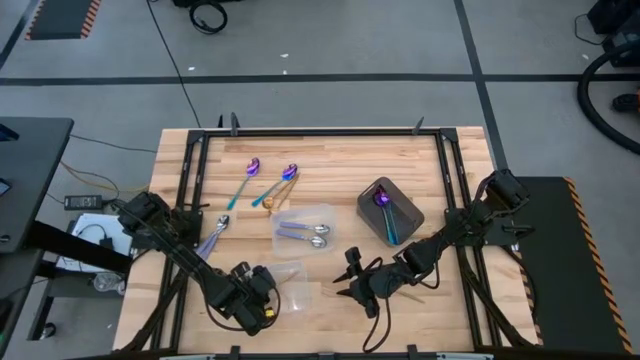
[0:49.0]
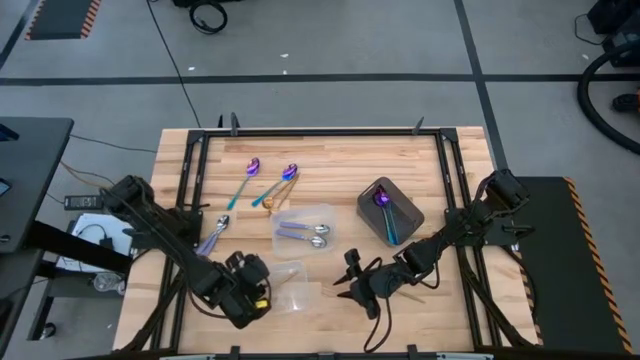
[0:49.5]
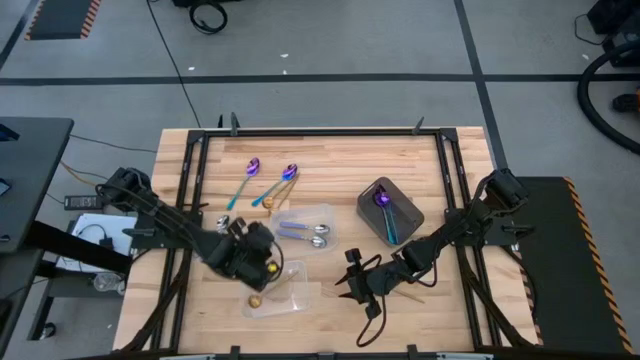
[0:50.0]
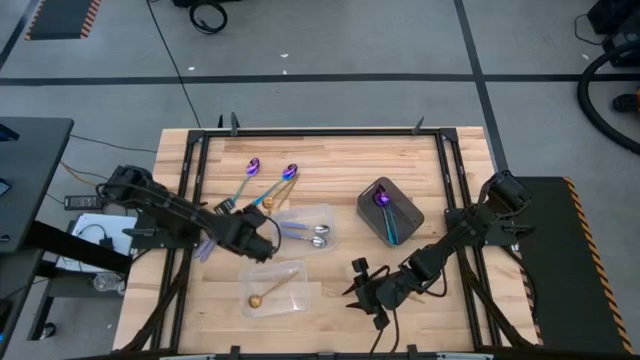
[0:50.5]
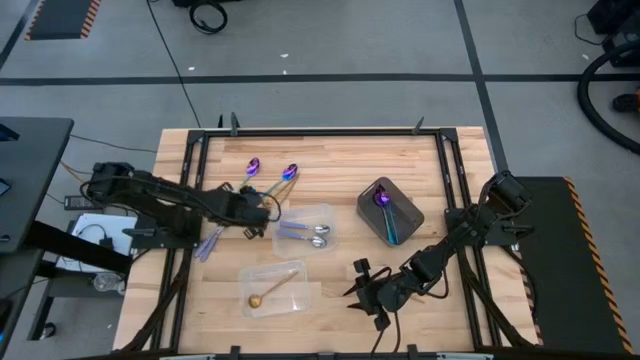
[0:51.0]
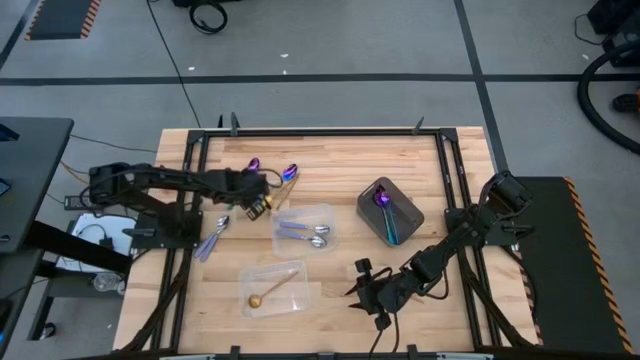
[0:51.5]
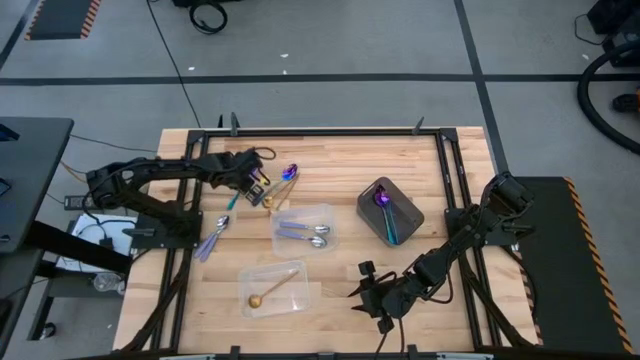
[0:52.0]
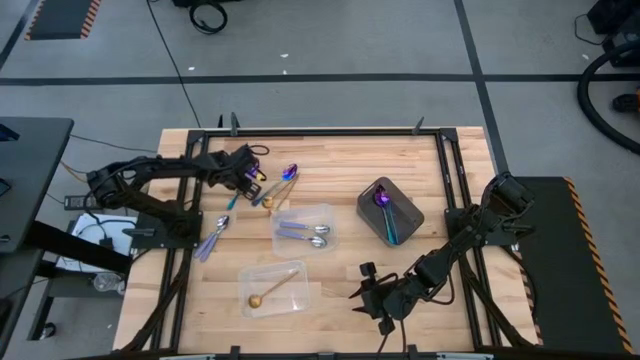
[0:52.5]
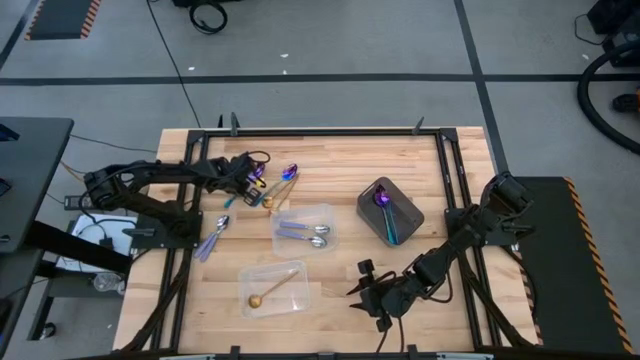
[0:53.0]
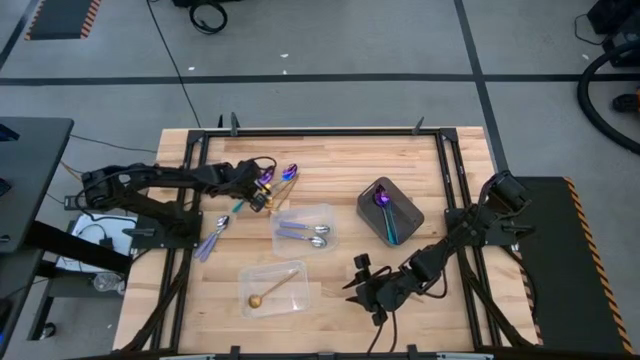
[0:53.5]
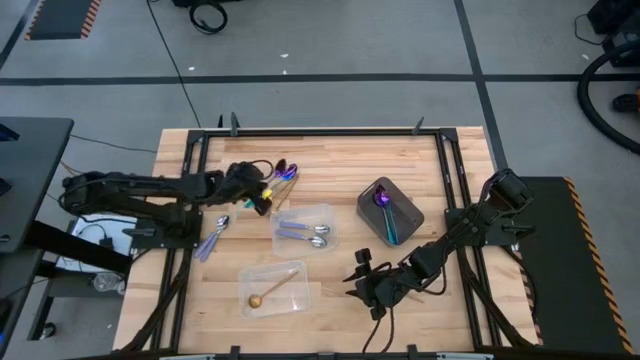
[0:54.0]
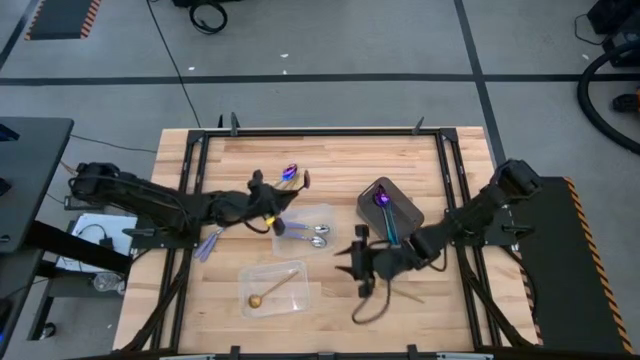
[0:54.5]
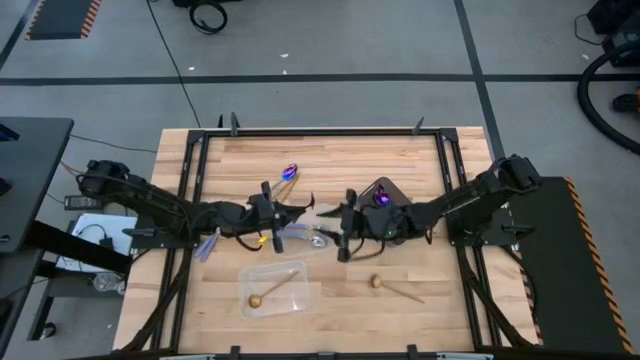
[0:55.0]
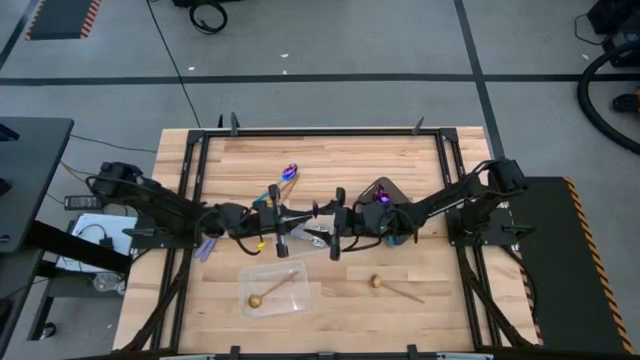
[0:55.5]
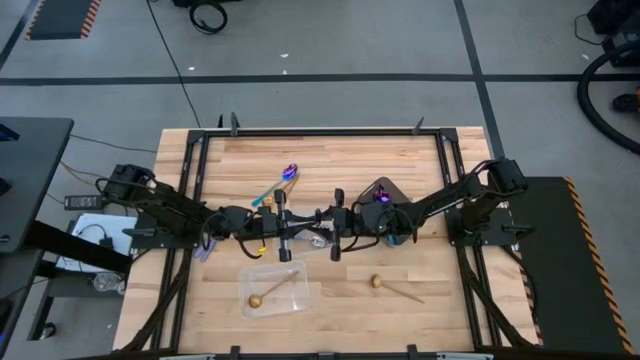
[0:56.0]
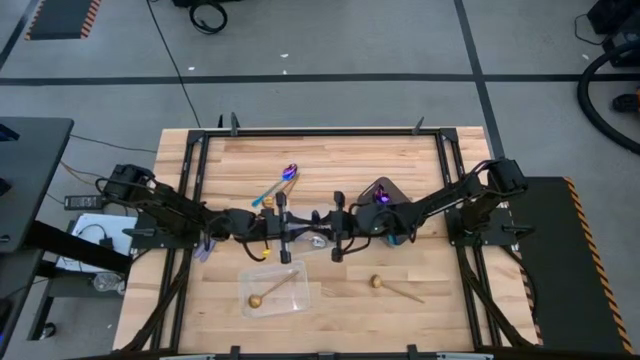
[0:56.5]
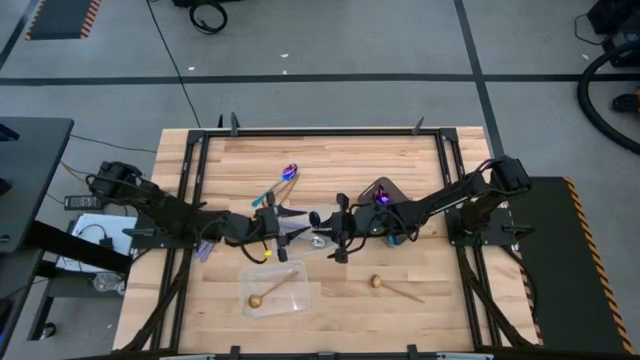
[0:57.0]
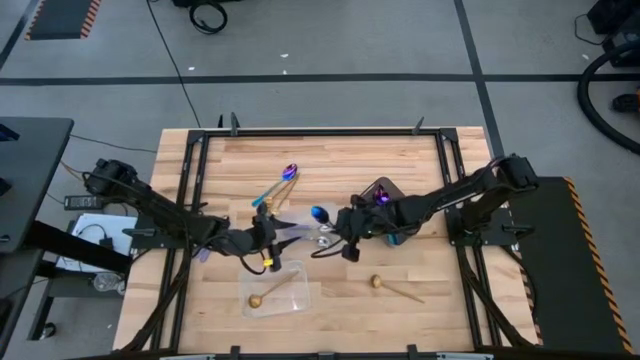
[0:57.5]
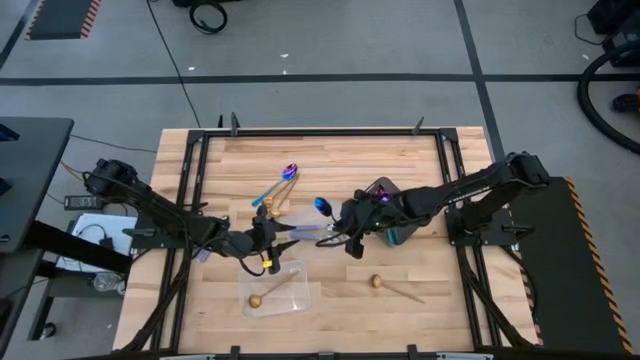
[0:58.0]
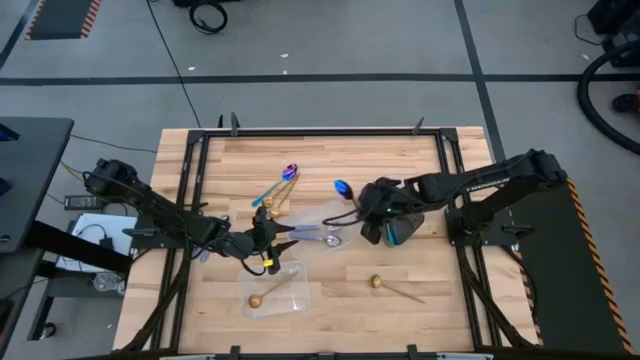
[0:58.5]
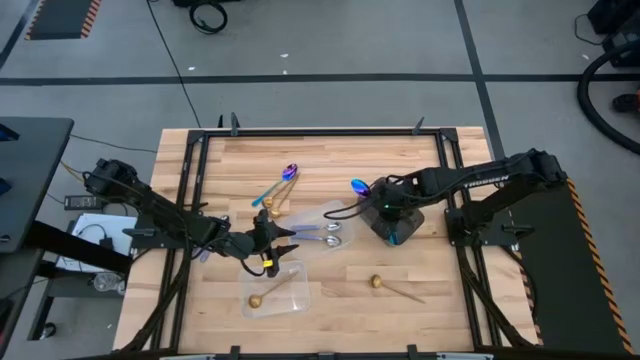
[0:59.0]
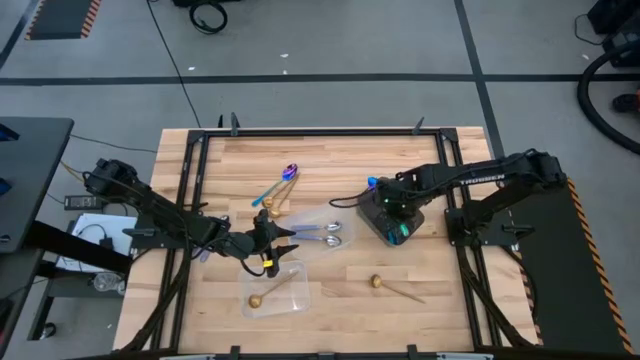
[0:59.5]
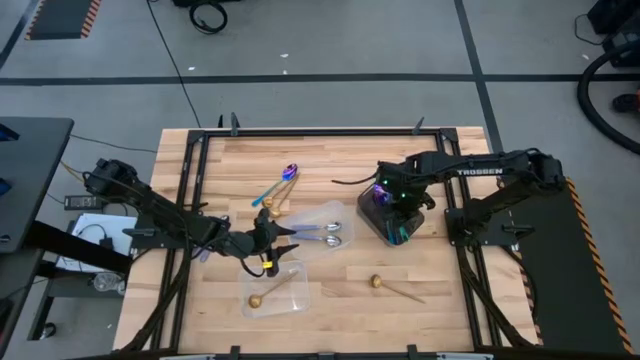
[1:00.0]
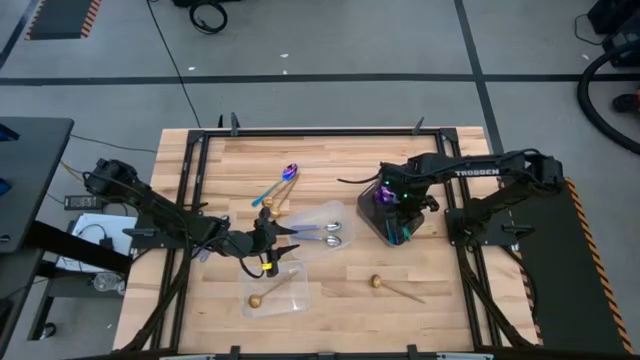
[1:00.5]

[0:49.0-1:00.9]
Task: Sort silverware by color (type)
Put the blue spoon into the black transparent bin

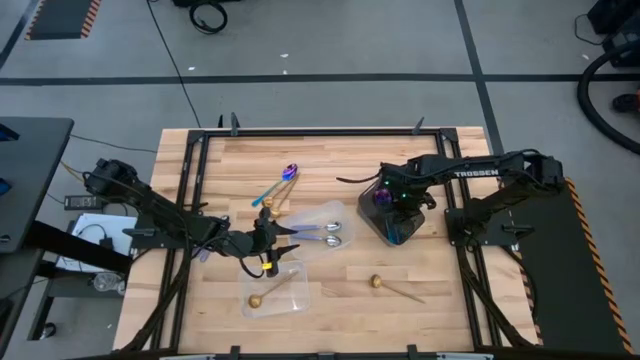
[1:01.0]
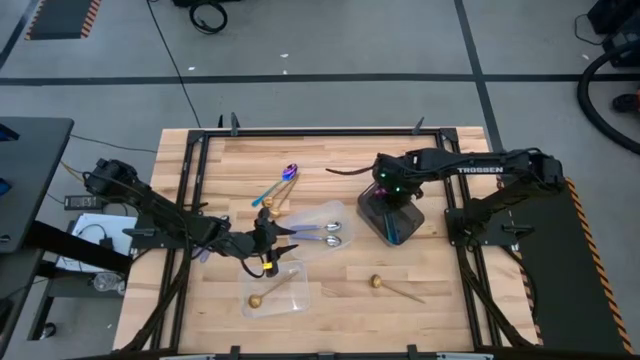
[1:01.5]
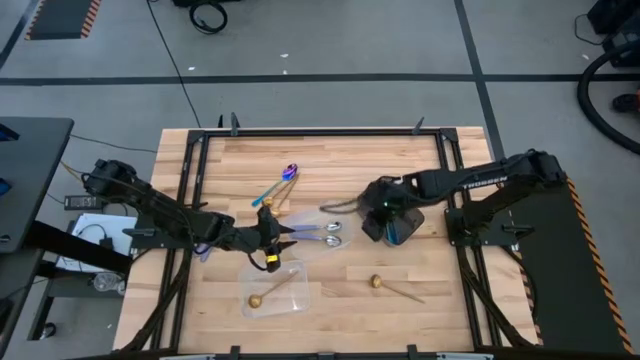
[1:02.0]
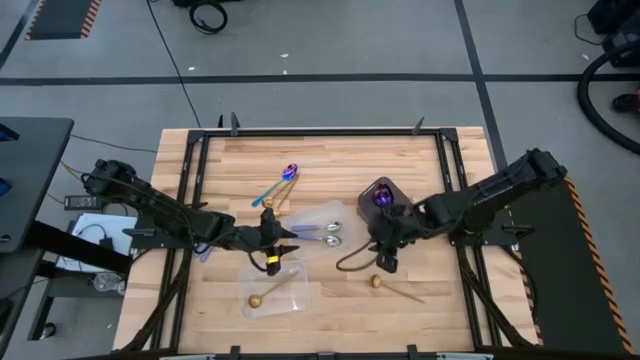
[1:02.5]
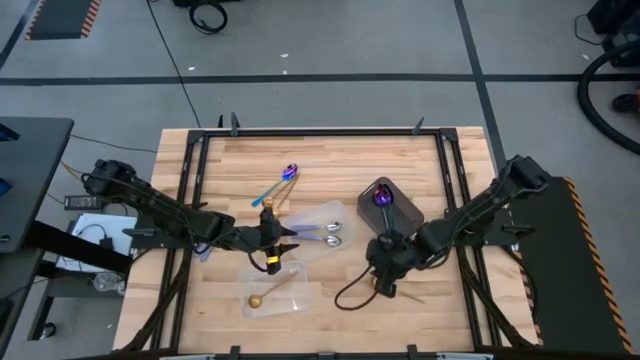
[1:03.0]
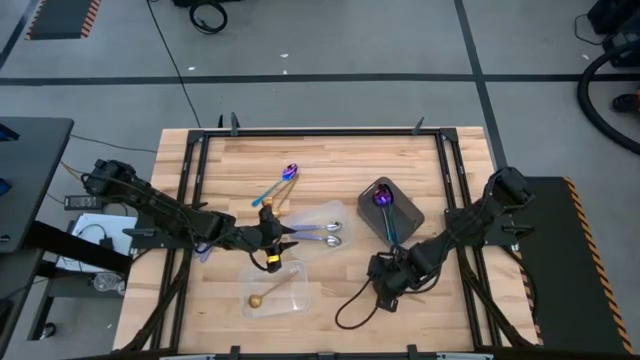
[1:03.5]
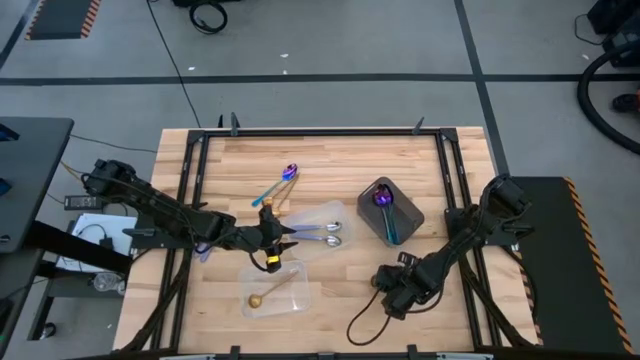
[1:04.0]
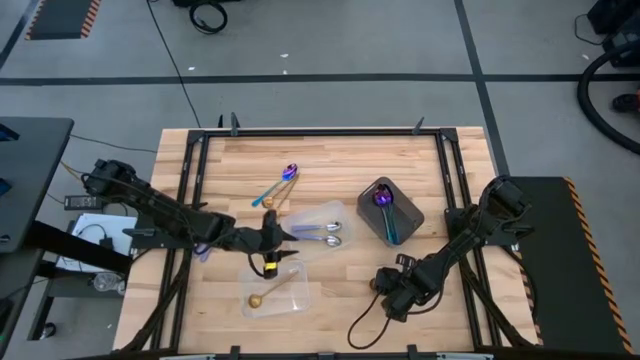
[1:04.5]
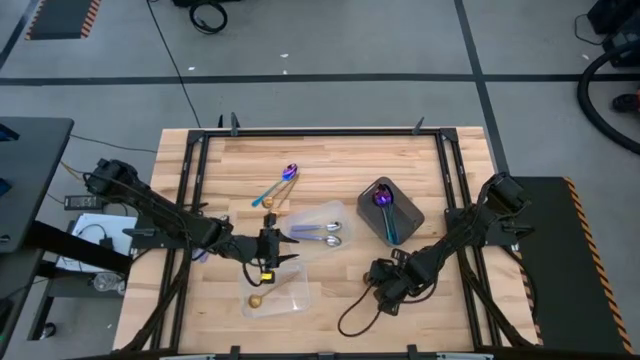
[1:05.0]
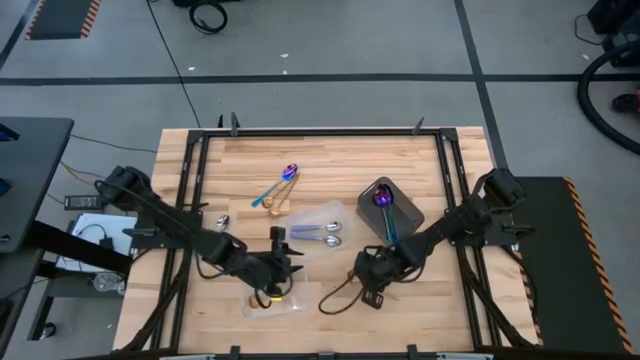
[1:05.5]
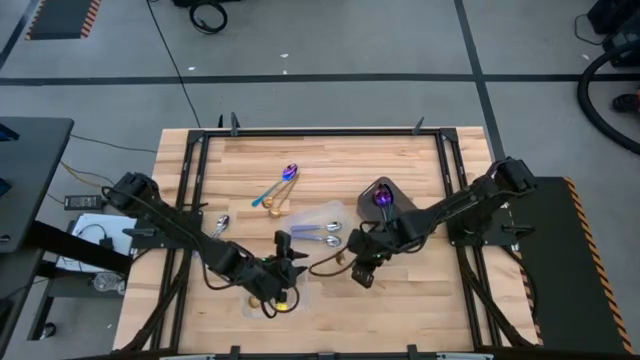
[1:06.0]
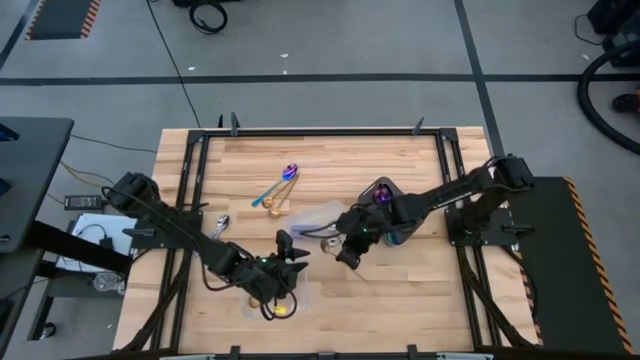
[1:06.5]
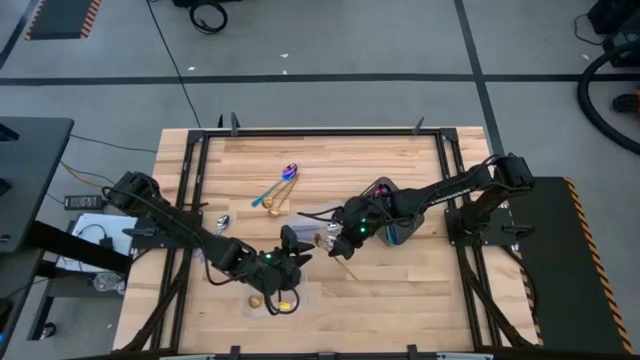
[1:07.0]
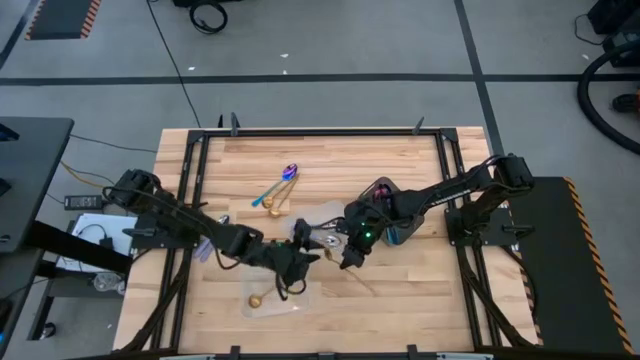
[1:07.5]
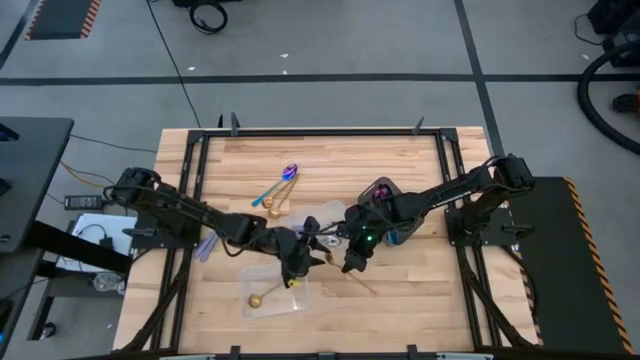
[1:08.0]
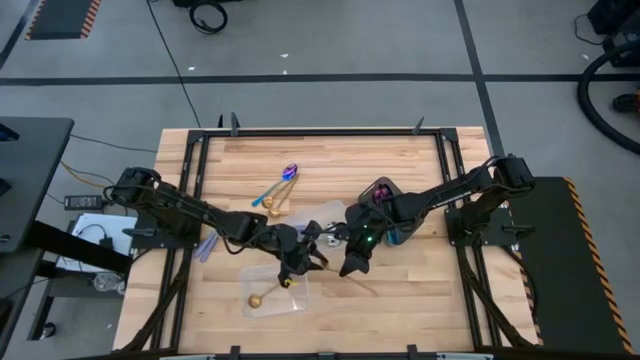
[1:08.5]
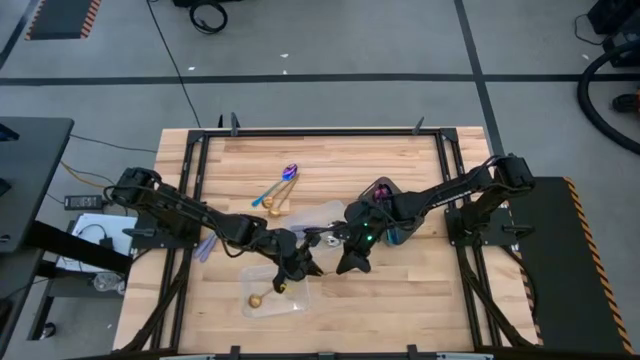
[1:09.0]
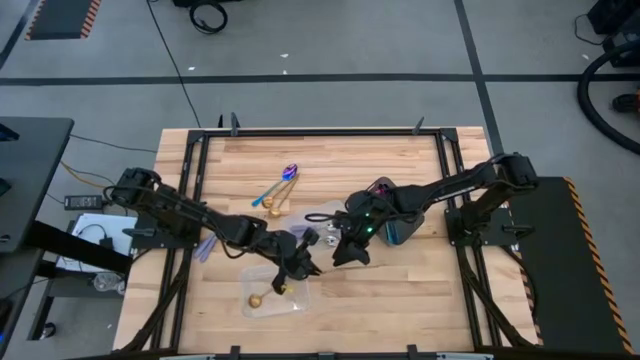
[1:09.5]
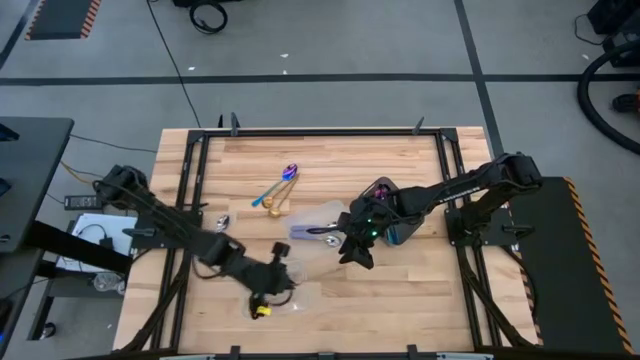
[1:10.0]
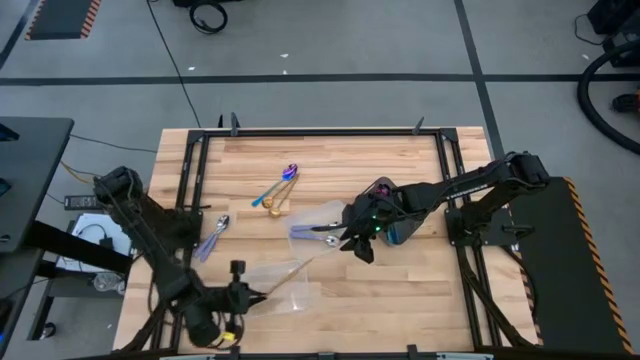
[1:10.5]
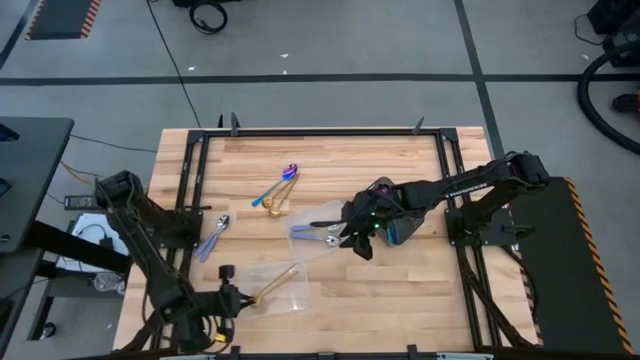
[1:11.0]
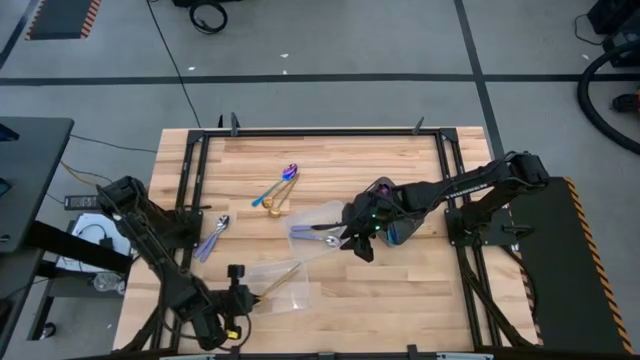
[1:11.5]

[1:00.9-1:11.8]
Put the gold spoon into the bottom transparent bin
